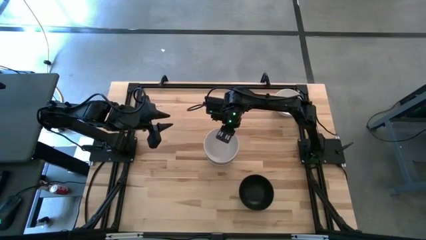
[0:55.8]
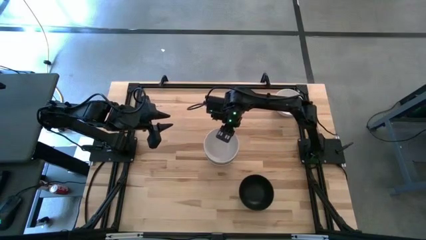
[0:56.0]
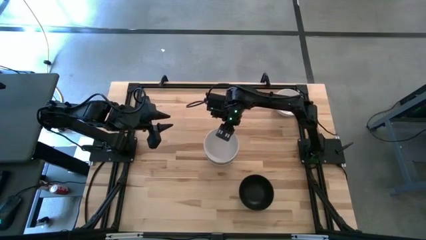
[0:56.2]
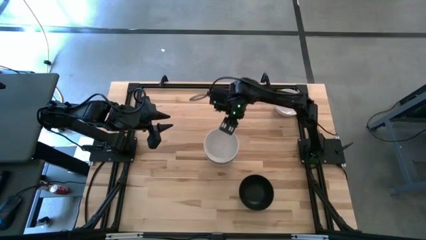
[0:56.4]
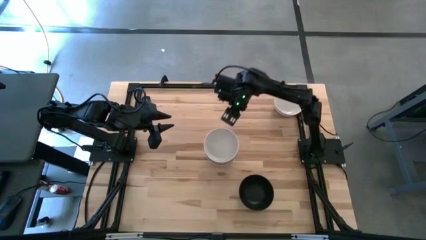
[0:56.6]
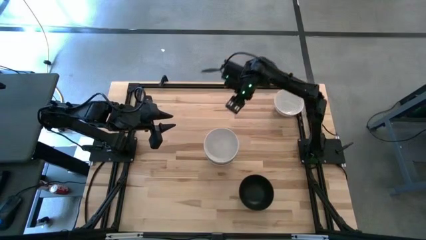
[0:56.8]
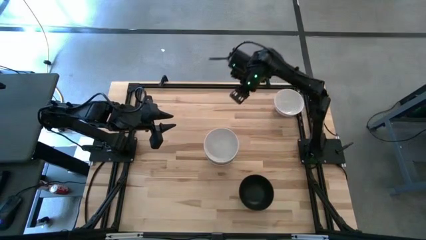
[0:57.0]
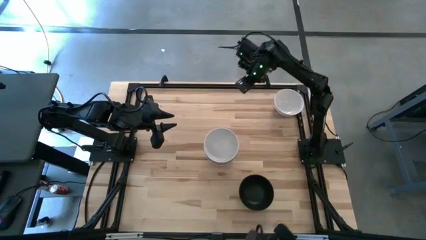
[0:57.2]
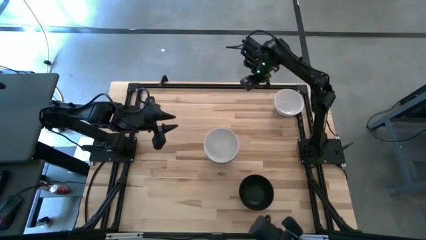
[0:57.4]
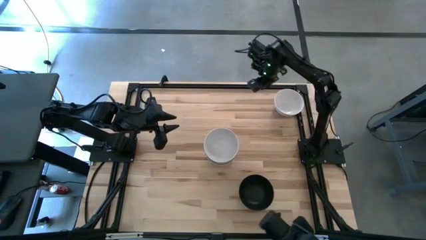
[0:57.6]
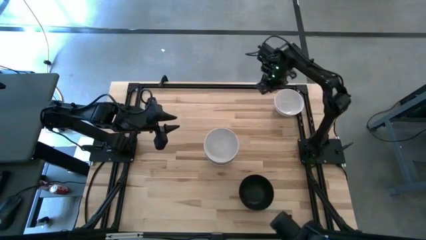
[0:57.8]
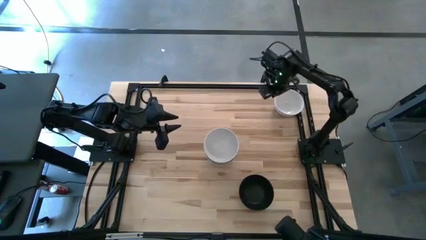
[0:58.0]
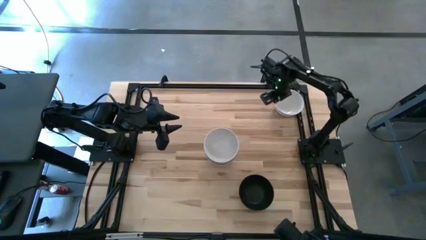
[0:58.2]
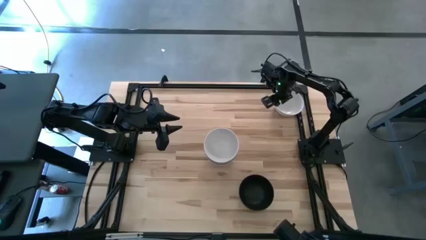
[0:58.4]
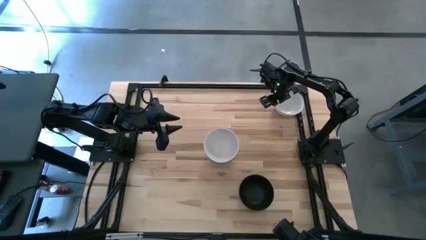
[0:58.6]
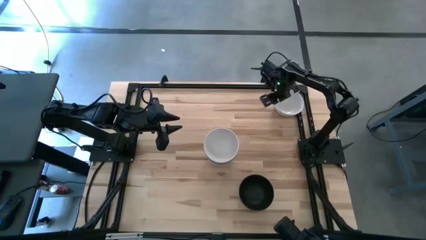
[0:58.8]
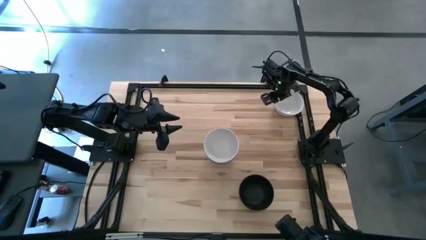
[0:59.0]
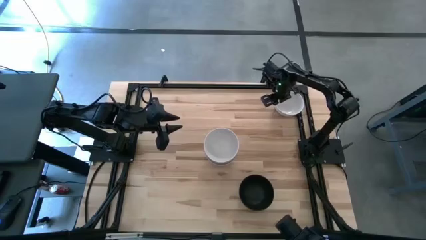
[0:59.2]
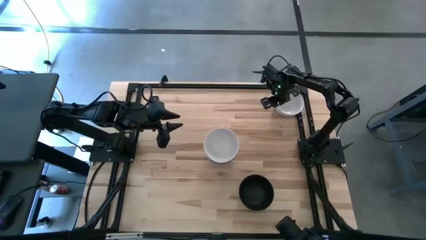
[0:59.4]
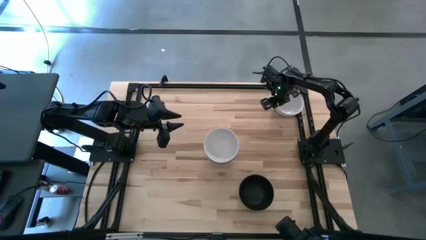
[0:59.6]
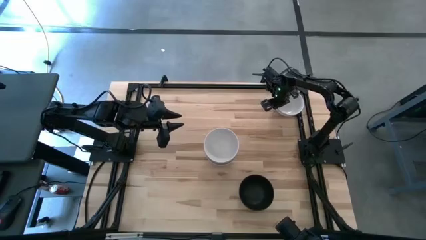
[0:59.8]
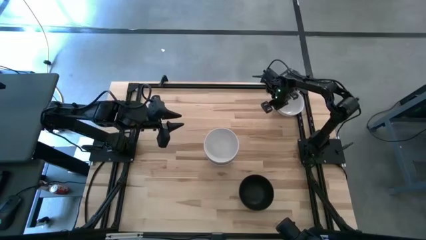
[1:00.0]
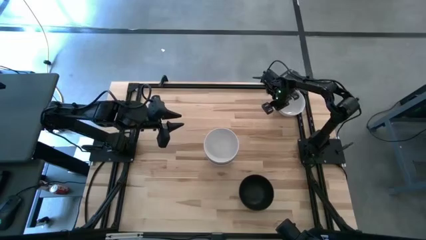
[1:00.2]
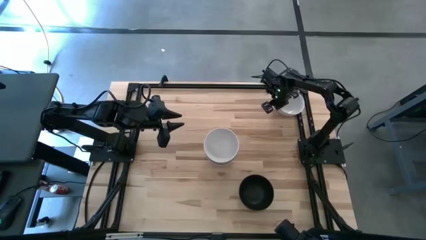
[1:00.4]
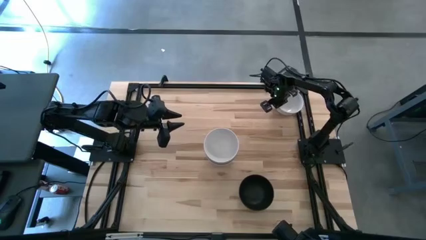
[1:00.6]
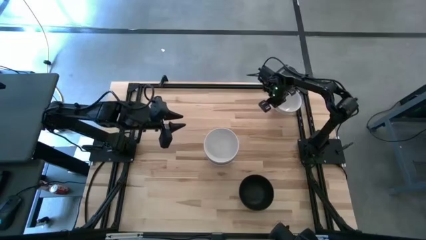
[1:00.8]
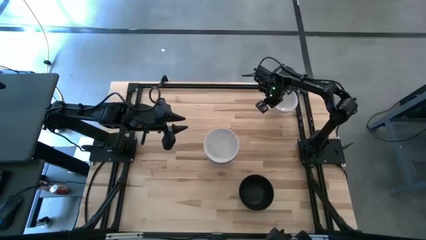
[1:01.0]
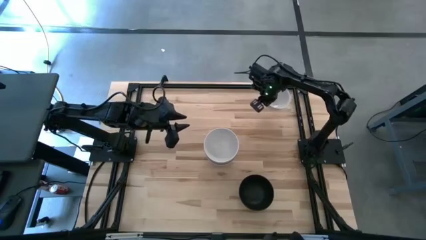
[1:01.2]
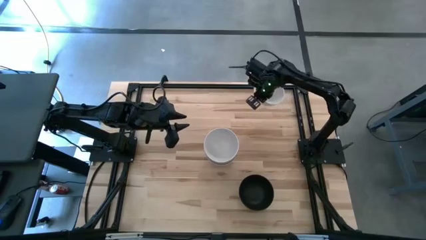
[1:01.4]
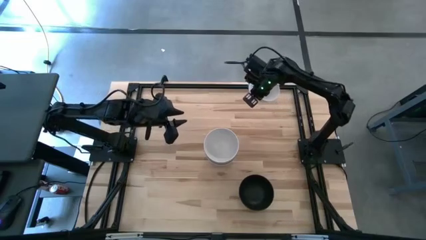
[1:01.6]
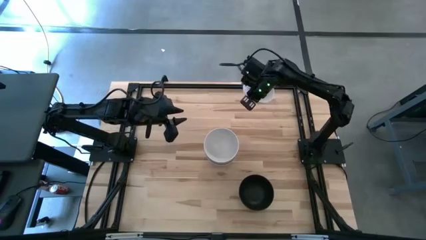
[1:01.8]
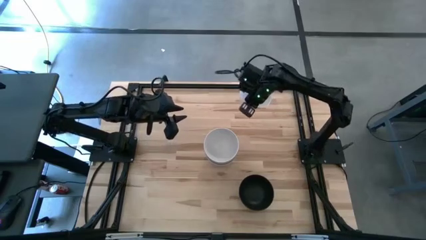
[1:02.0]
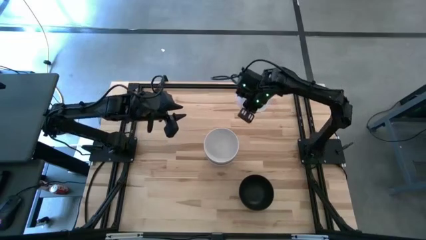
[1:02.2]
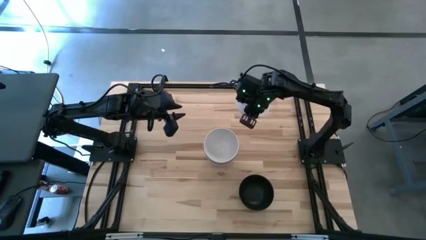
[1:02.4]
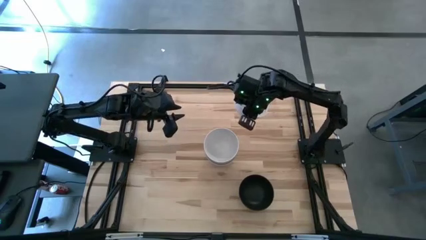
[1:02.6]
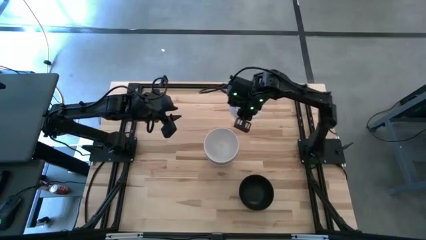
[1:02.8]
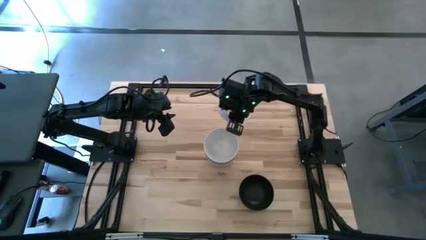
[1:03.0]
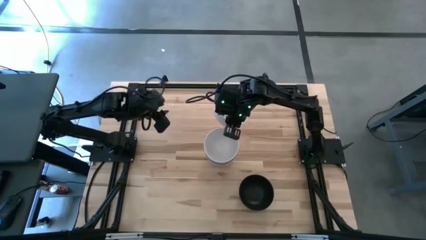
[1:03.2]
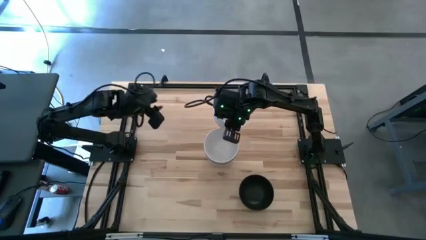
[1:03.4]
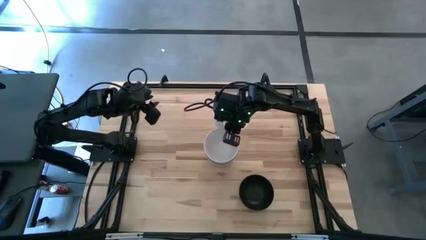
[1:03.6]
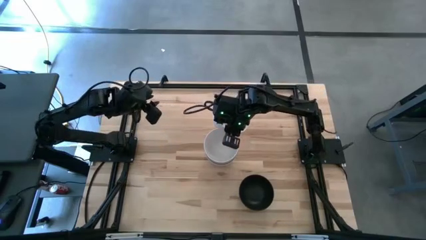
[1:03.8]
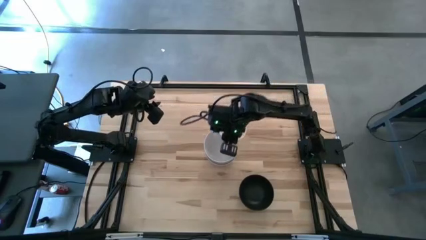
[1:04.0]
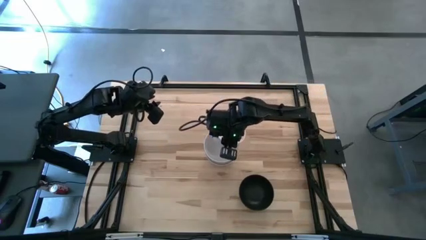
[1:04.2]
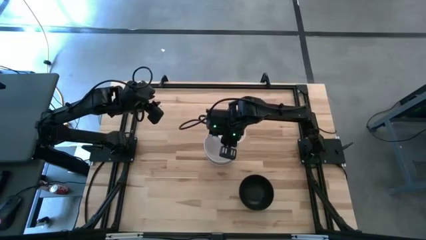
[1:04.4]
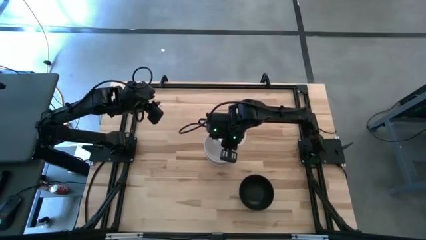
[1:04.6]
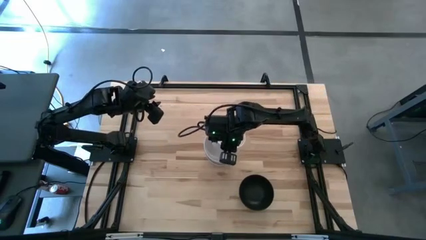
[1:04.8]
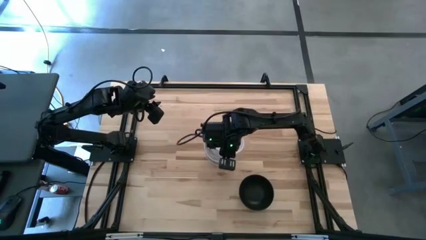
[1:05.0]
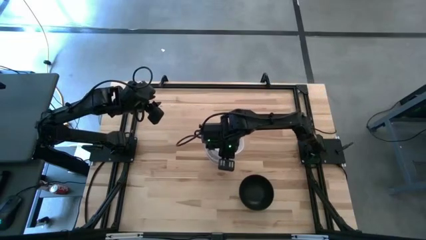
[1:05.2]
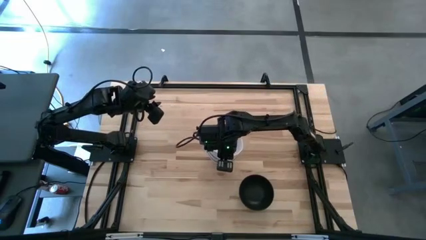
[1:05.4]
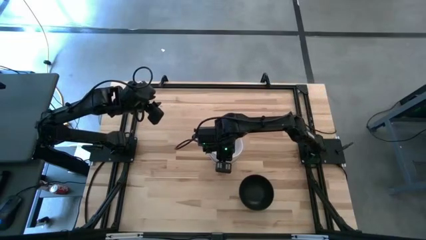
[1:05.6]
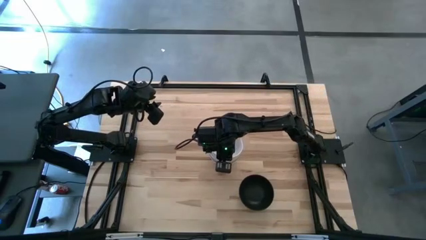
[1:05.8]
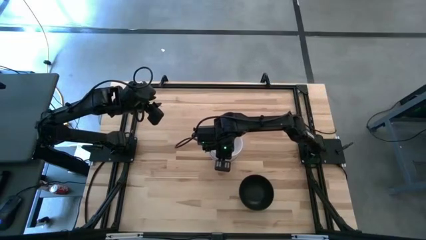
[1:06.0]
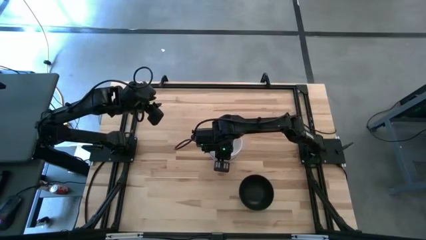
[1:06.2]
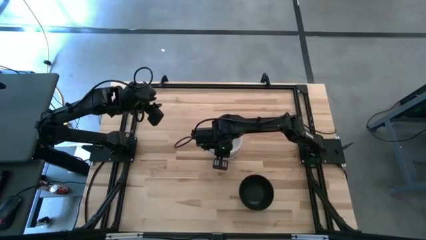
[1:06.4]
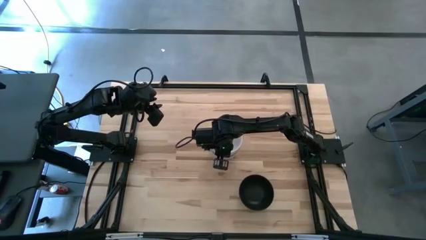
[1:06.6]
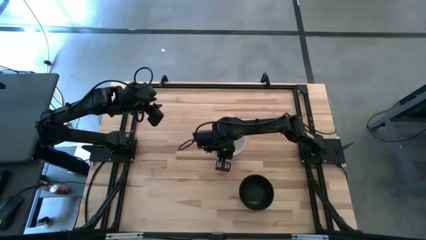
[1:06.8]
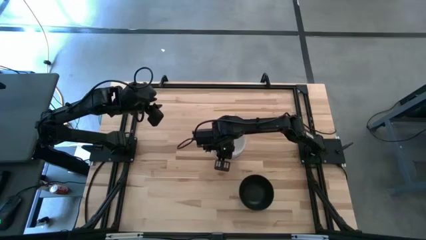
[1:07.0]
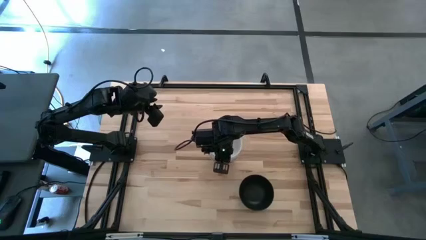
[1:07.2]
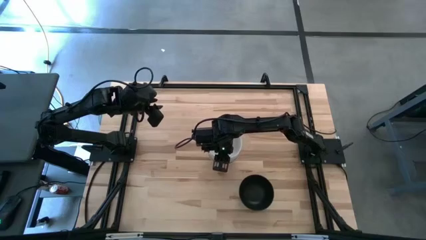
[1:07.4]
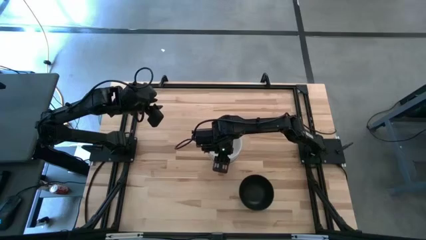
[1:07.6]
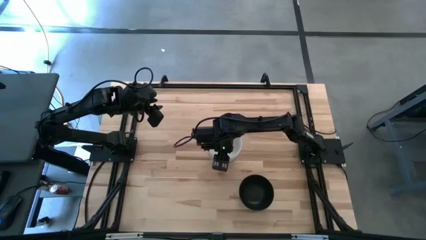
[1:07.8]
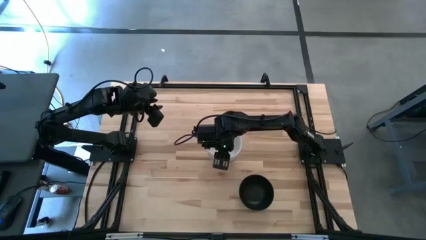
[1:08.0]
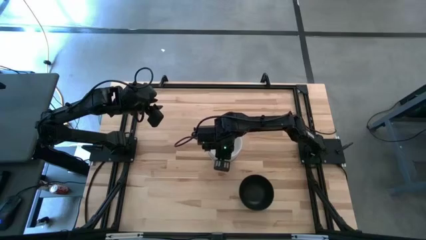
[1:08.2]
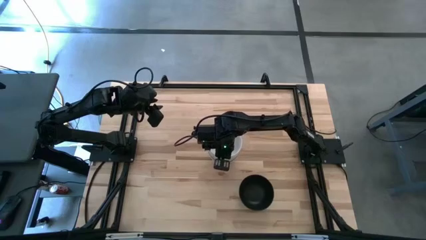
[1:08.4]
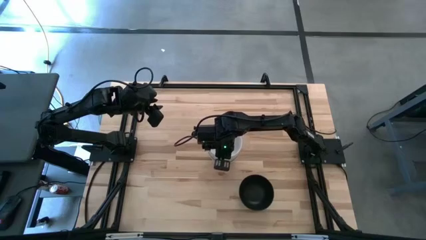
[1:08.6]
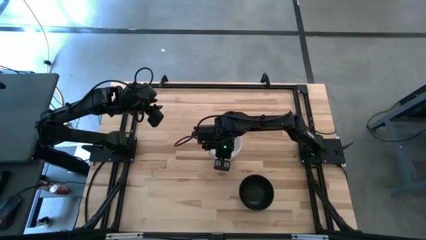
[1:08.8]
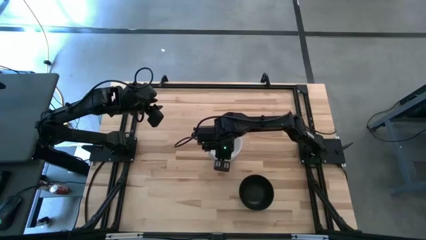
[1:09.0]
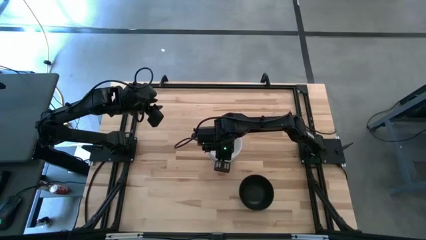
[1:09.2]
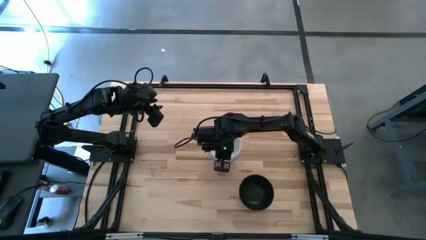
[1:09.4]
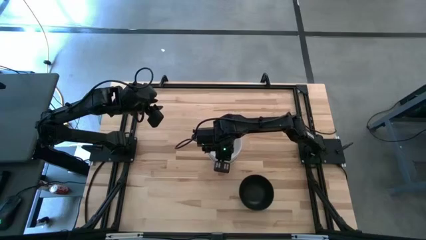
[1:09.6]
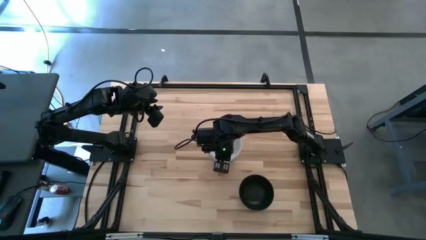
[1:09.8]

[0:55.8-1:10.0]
Task: Nest bowls inside each other
Stack the white bowl on the white bowl
